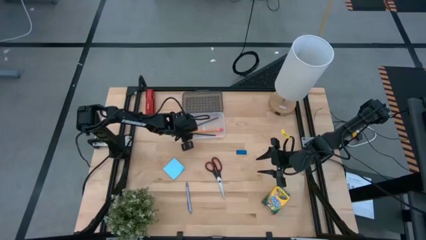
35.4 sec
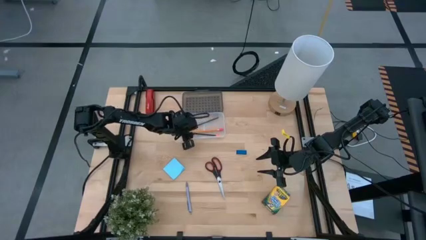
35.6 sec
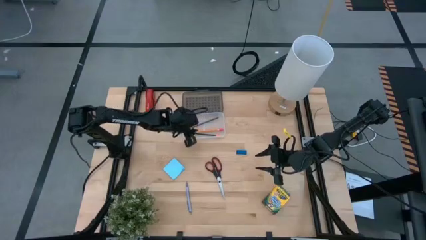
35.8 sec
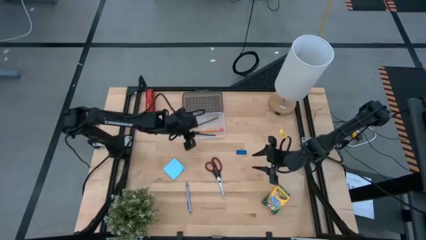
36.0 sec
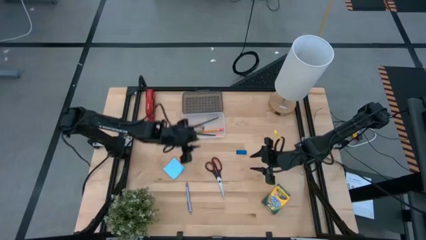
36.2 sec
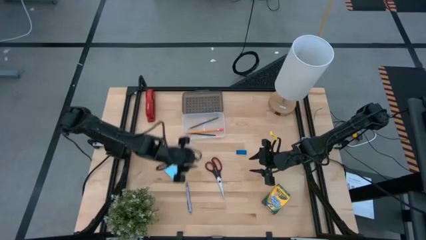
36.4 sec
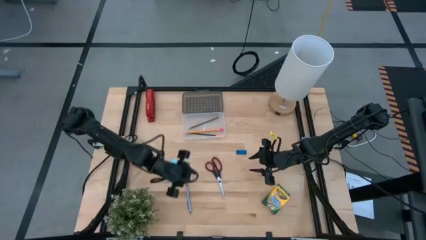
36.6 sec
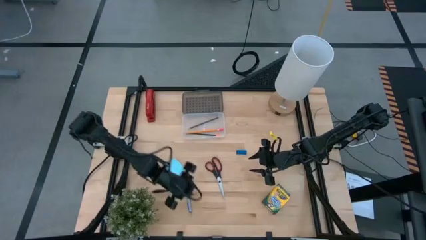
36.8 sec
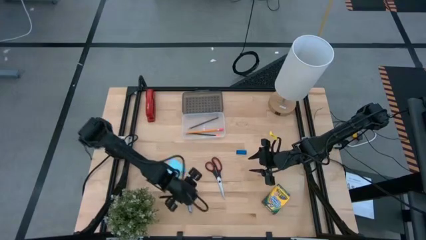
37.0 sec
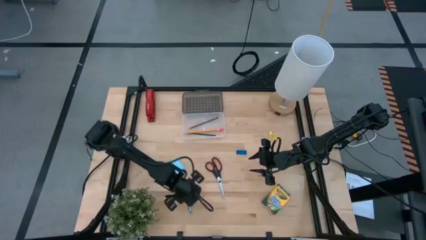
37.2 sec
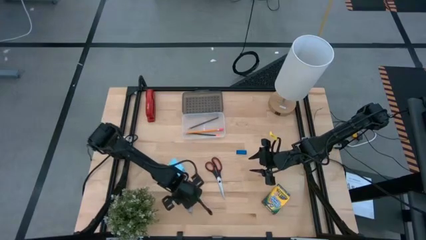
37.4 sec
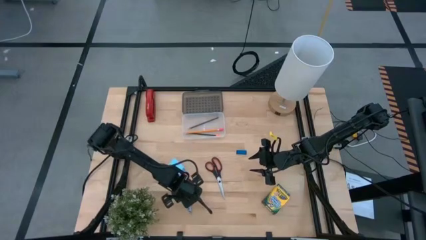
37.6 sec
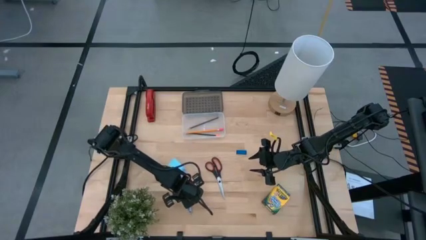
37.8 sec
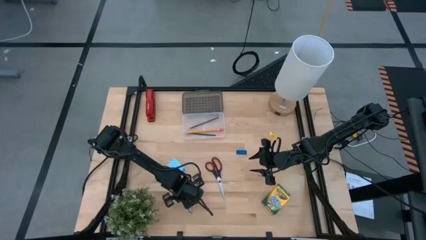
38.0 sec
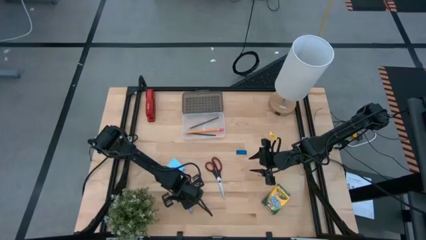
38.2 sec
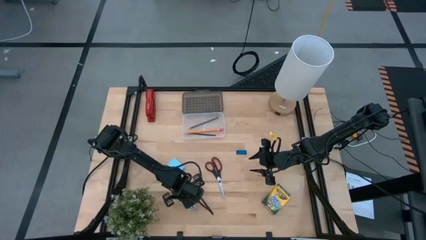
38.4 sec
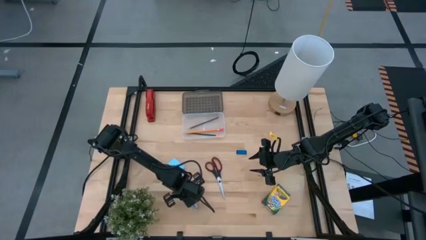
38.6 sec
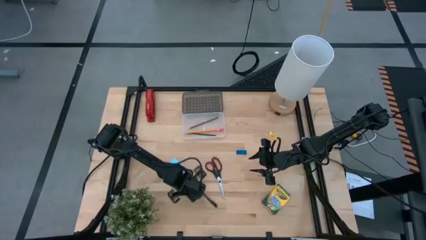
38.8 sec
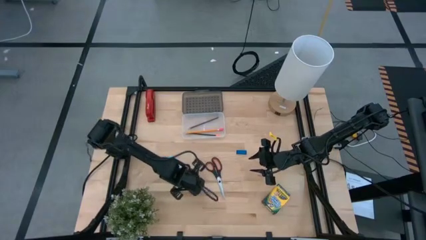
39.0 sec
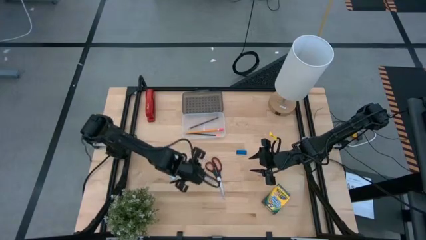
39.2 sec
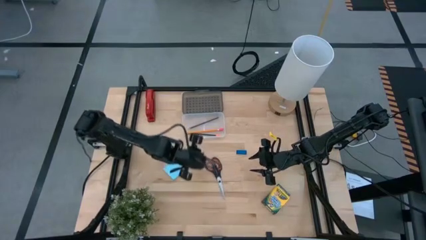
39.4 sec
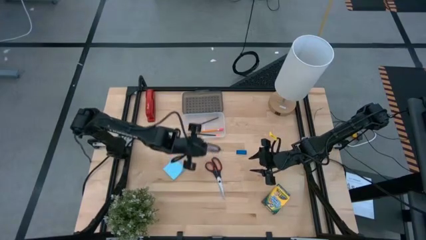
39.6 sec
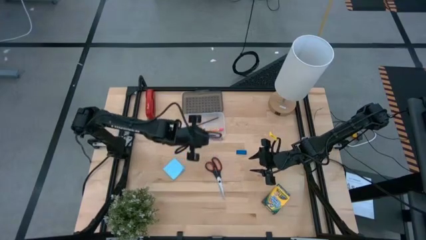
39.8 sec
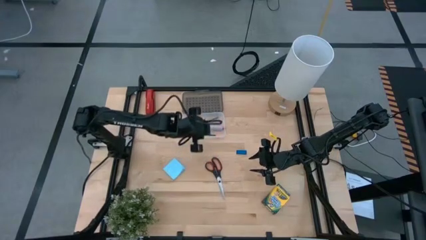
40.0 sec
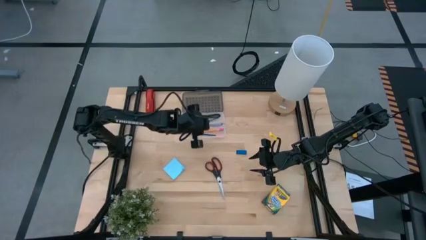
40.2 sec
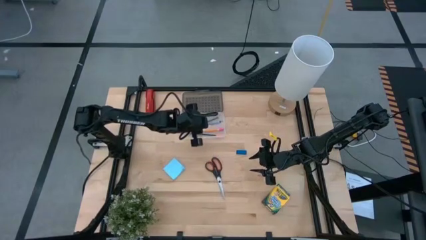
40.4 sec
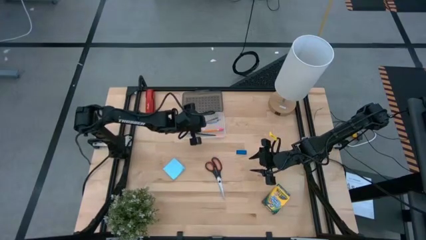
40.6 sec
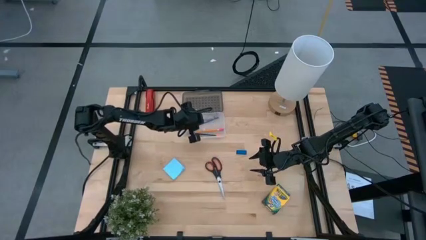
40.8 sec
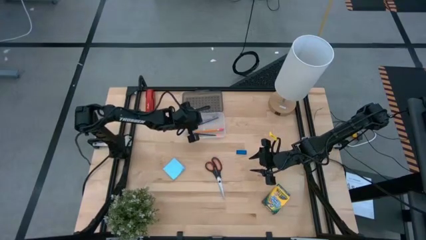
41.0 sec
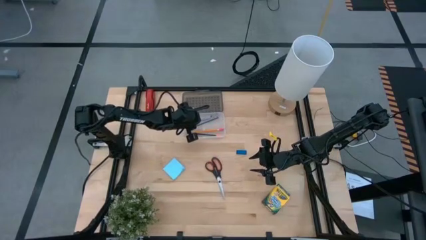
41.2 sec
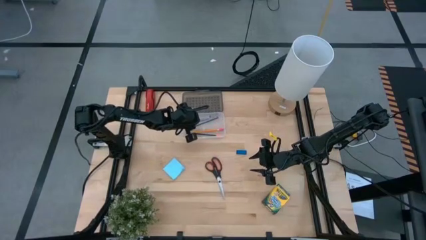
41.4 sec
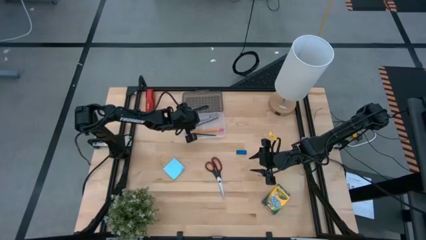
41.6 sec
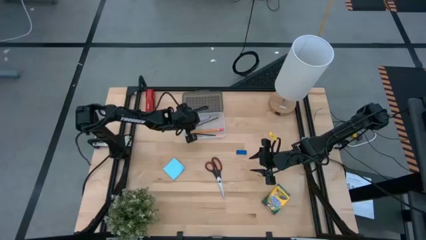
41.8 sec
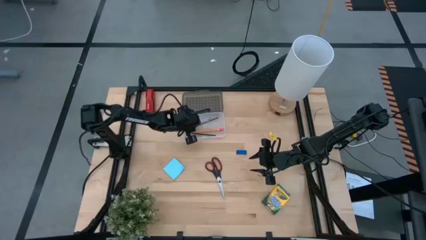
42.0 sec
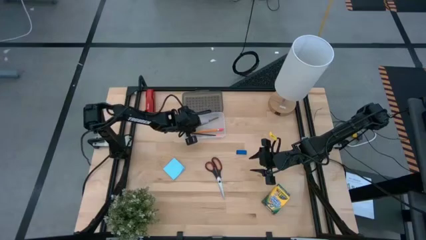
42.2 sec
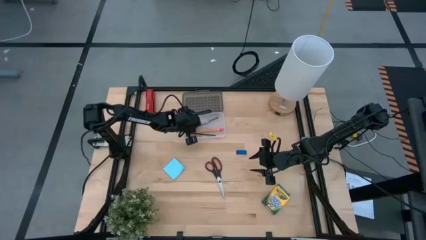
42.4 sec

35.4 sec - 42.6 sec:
Task: Pack school essentials
Put the light blue pen into the black supply box

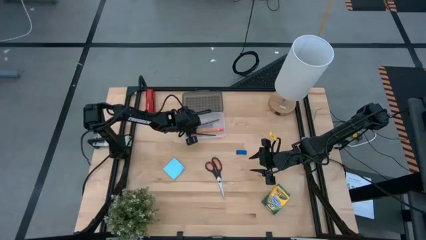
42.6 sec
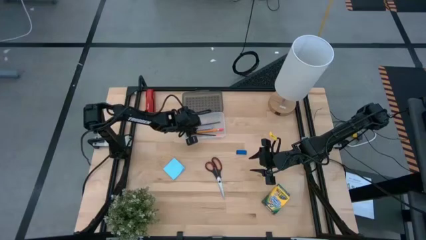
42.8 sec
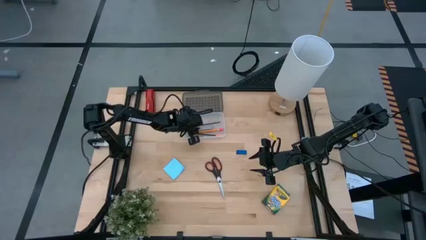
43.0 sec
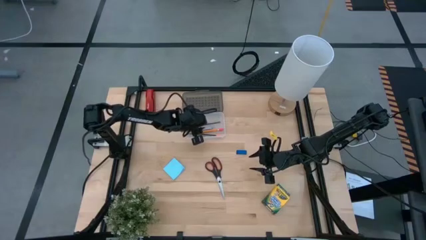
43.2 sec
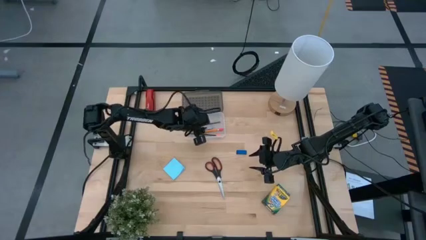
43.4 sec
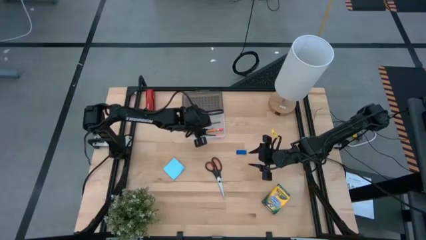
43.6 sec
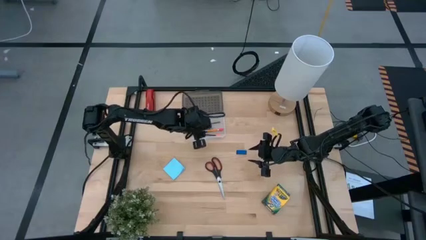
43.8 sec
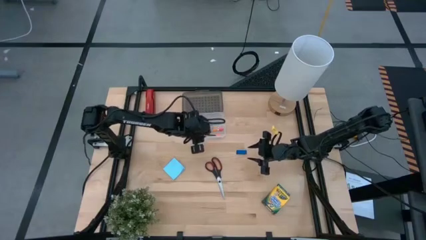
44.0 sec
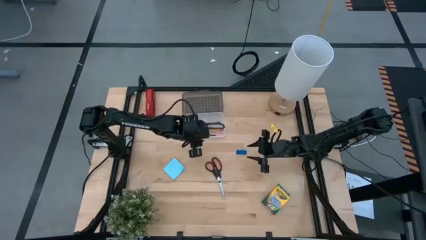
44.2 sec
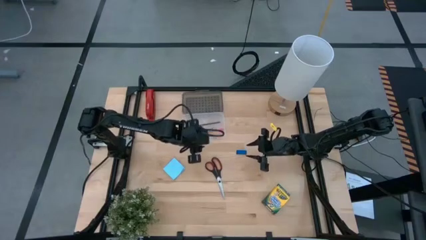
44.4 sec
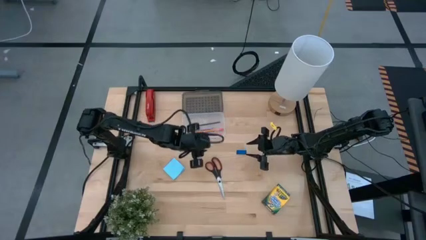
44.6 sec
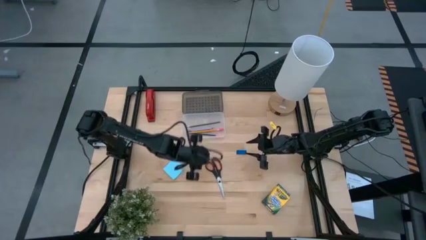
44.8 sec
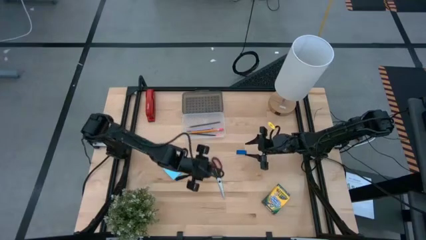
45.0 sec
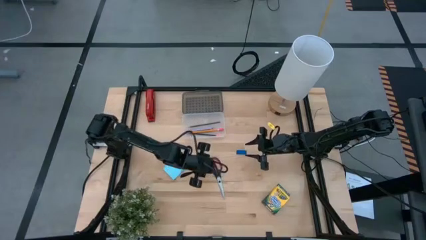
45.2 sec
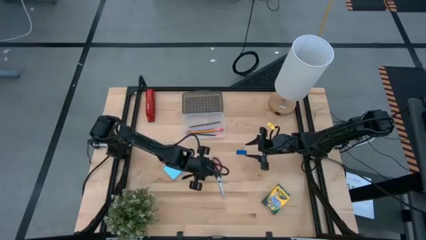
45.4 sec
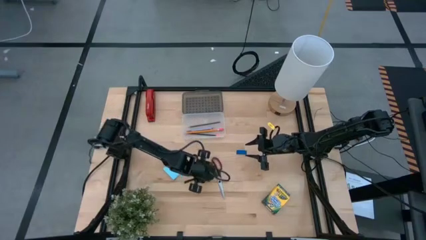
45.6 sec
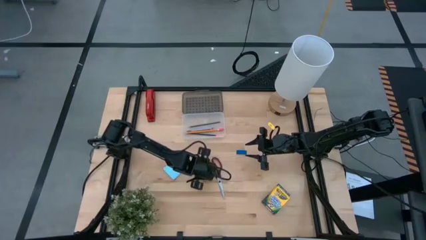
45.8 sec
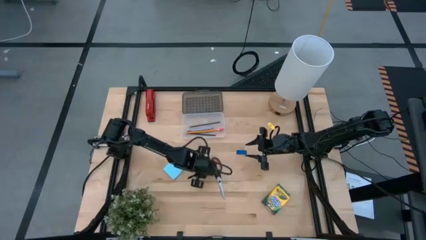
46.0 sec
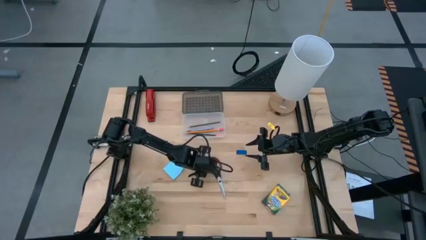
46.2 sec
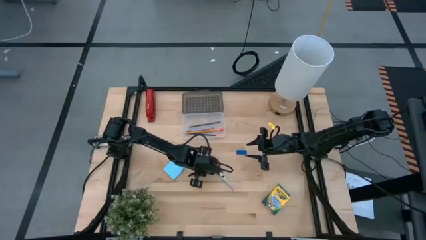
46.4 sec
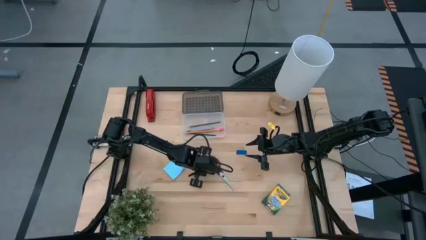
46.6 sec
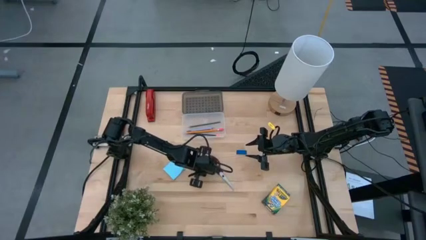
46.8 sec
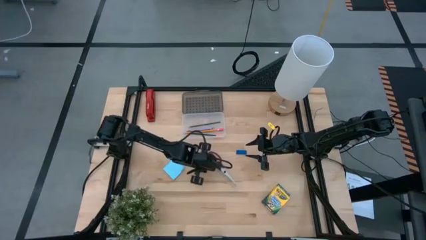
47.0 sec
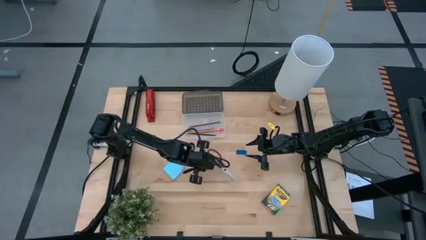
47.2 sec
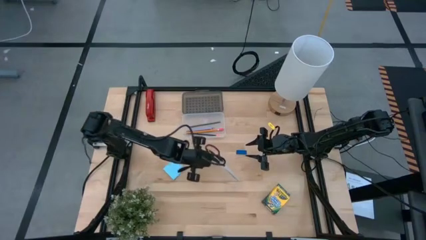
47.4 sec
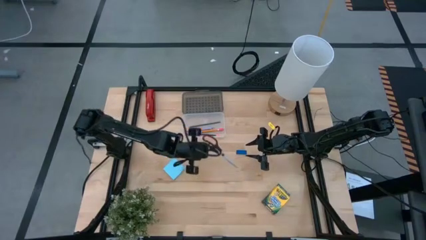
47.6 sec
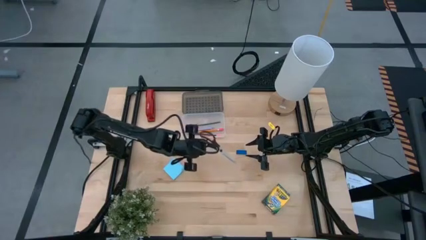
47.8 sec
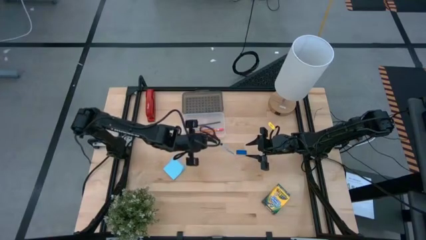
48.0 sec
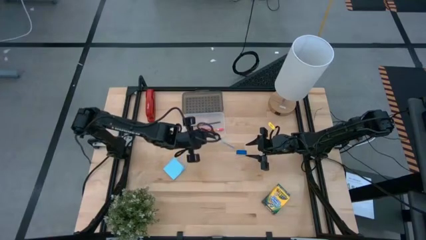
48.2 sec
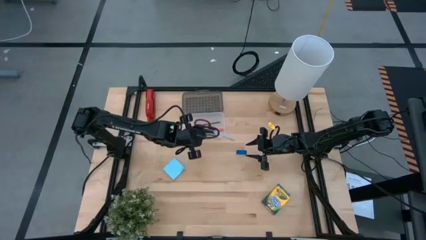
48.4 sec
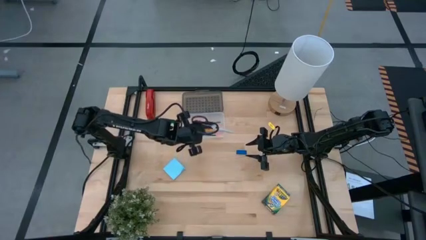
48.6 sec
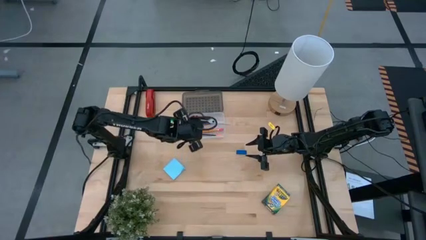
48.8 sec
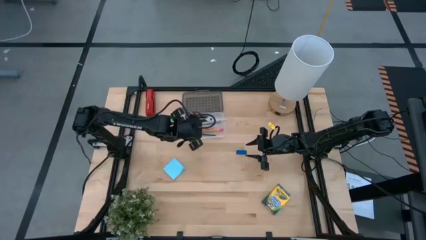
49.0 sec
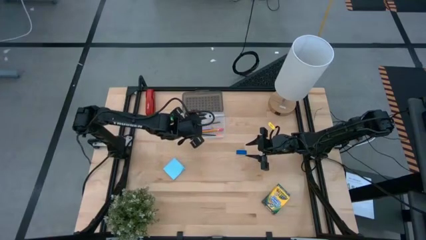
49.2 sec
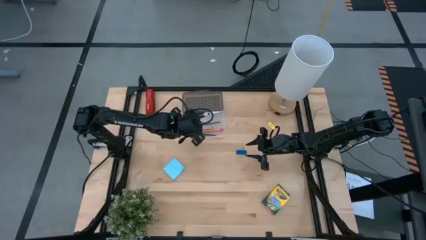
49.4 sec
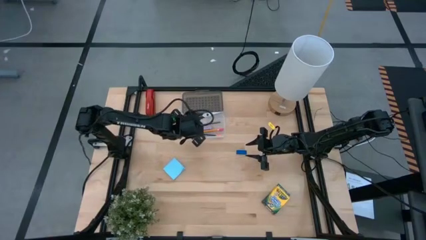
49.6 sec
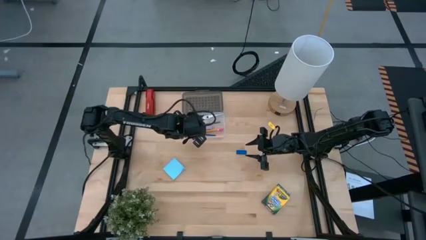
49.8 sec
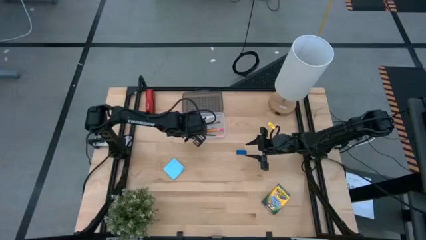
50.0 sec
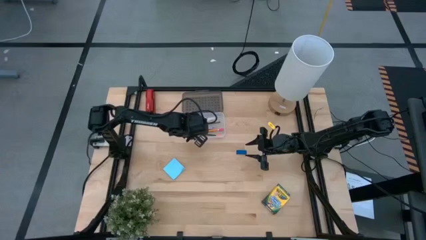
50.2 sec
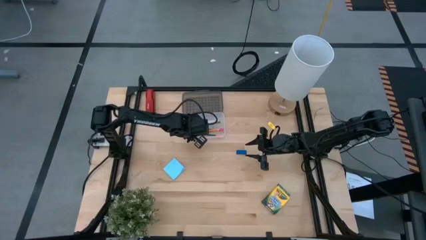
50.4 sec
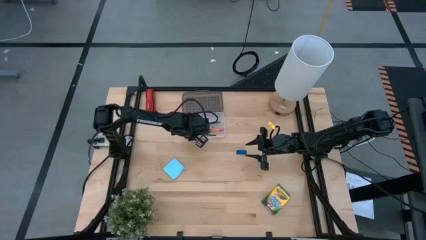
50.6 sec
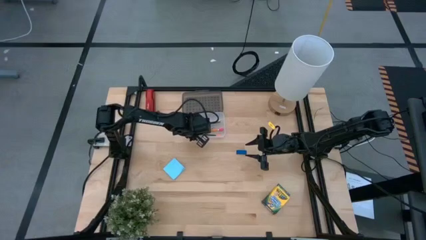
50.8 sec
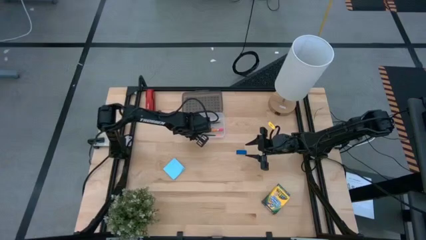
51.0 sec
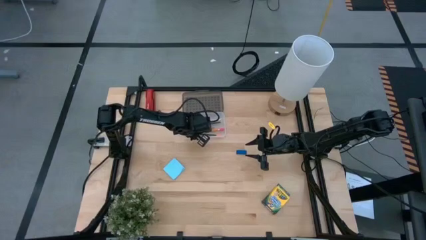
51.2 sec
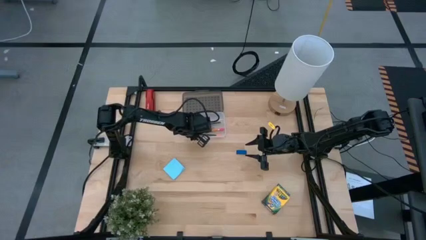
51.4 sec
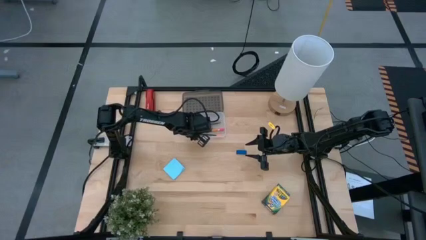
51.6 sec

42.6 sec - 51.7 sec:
Put the black scissors into the black supply box
